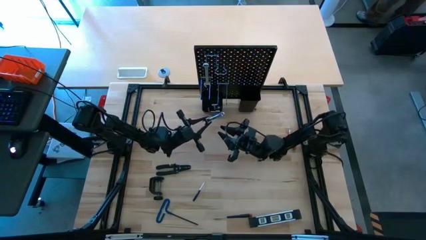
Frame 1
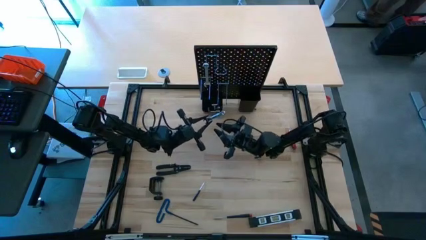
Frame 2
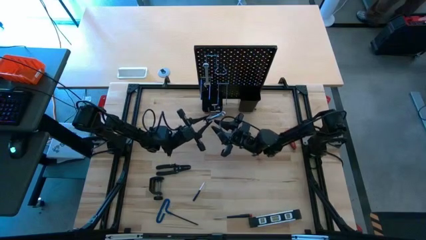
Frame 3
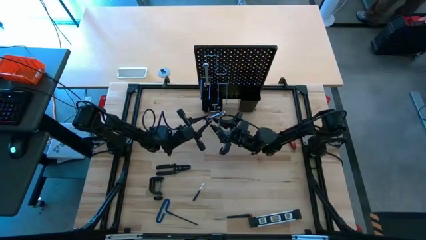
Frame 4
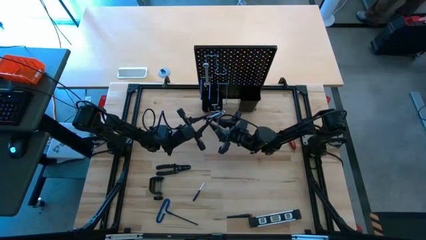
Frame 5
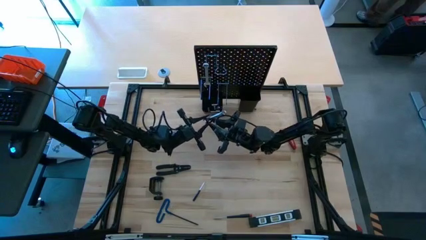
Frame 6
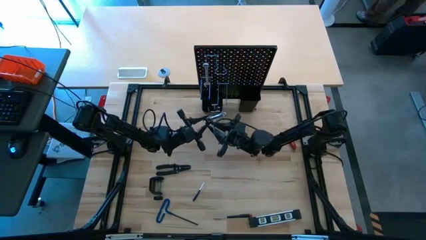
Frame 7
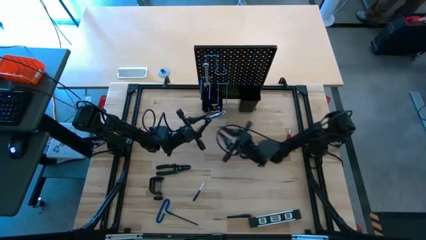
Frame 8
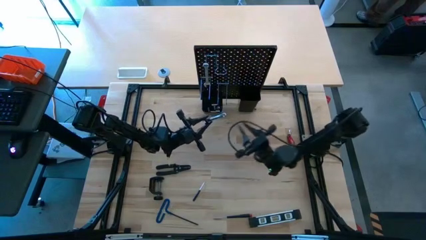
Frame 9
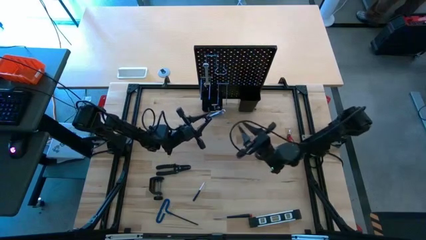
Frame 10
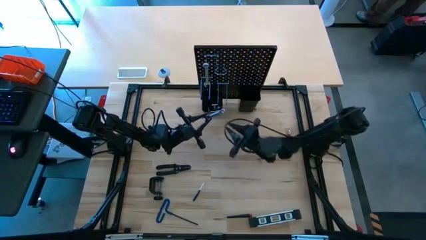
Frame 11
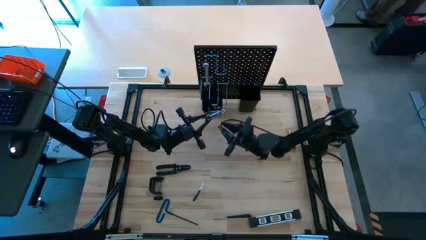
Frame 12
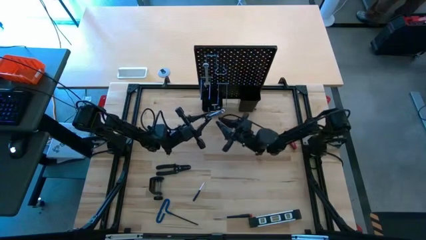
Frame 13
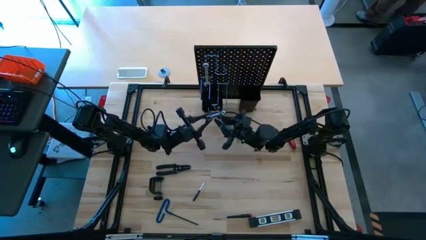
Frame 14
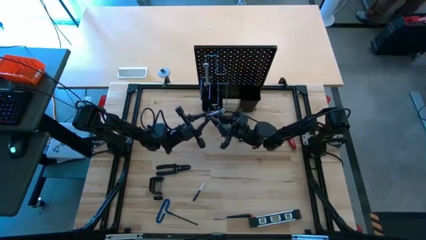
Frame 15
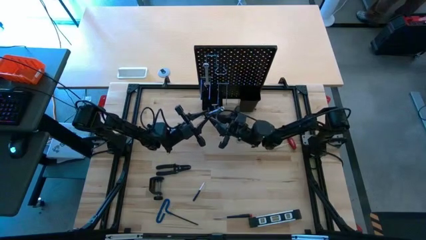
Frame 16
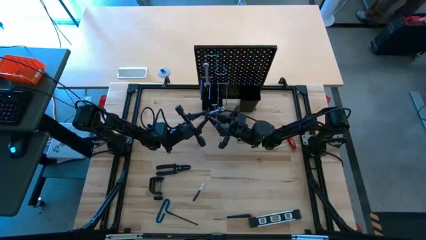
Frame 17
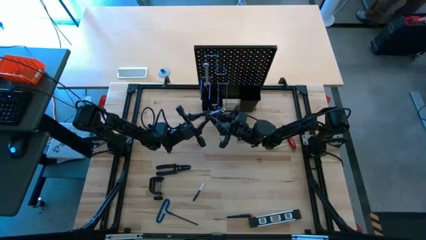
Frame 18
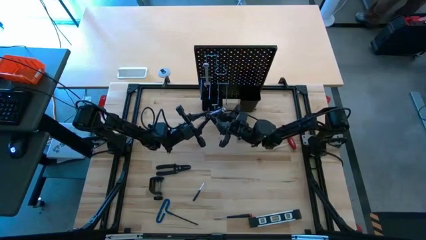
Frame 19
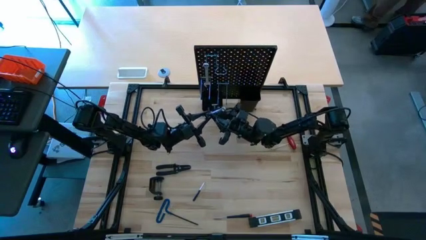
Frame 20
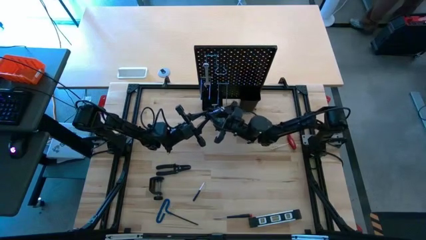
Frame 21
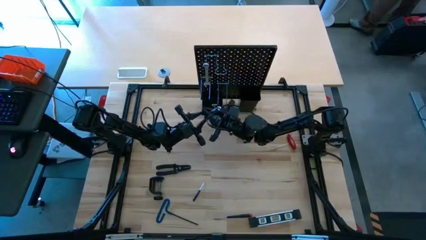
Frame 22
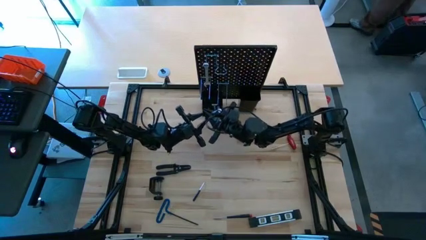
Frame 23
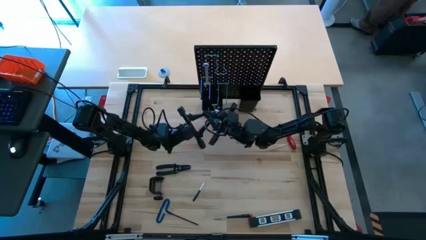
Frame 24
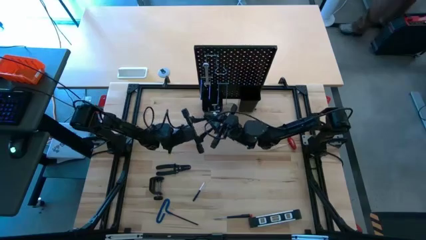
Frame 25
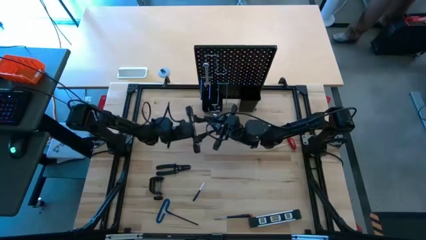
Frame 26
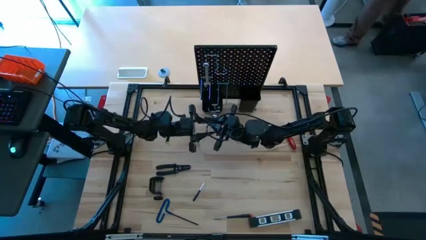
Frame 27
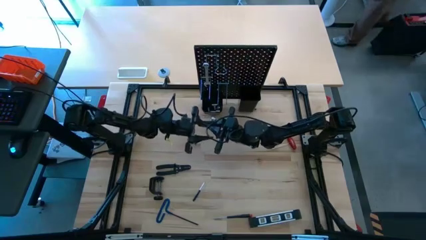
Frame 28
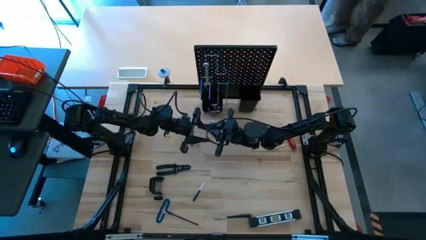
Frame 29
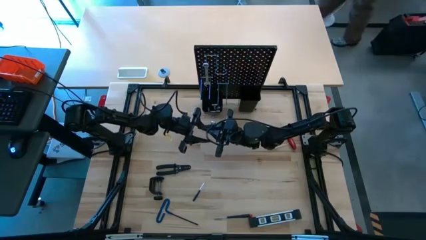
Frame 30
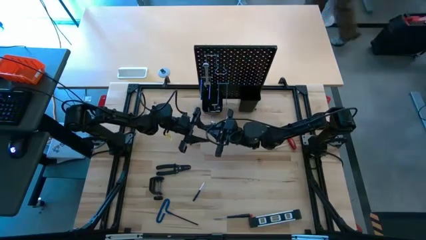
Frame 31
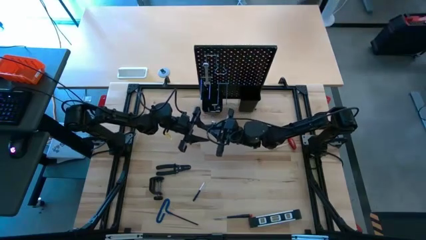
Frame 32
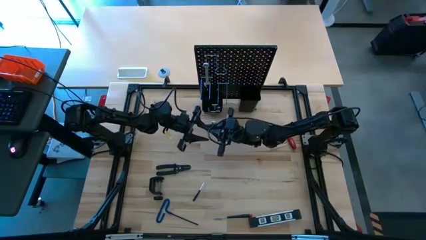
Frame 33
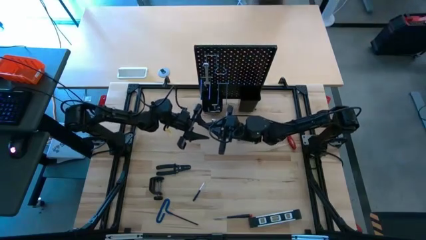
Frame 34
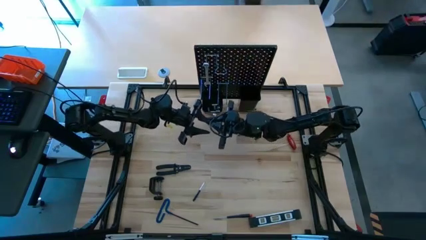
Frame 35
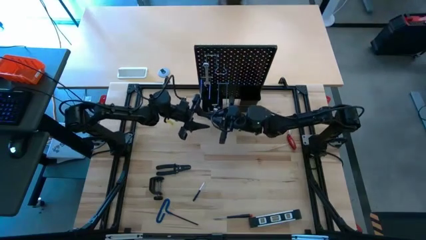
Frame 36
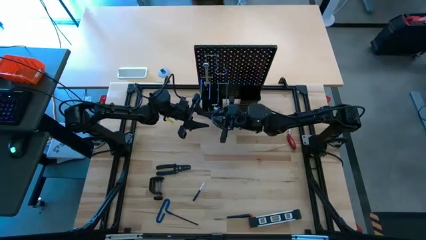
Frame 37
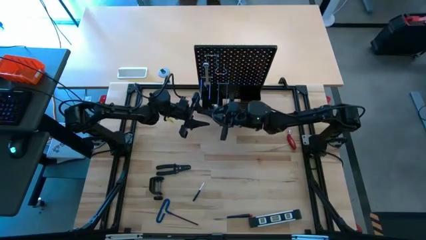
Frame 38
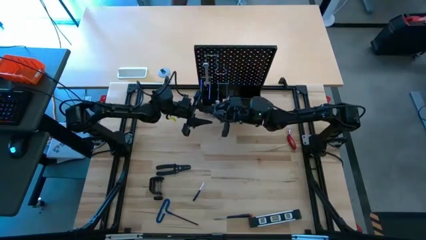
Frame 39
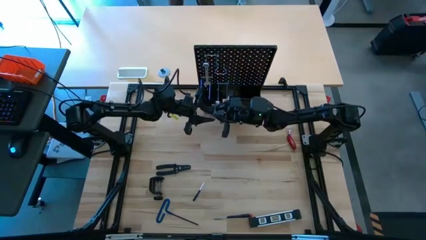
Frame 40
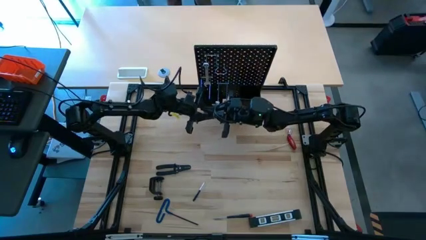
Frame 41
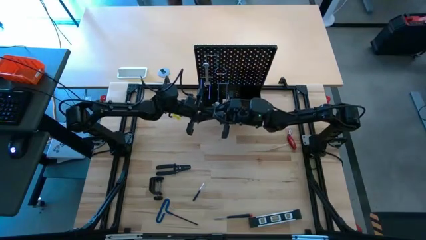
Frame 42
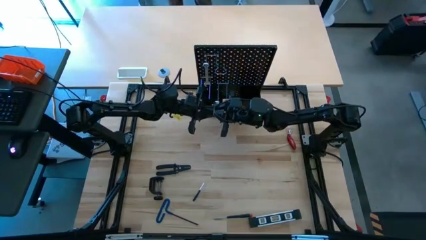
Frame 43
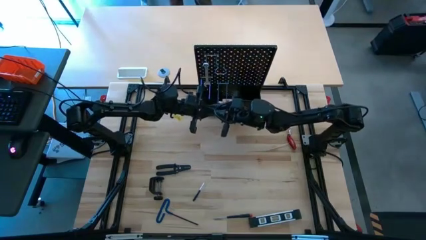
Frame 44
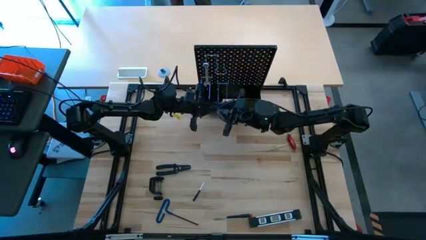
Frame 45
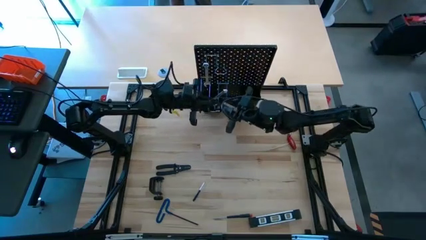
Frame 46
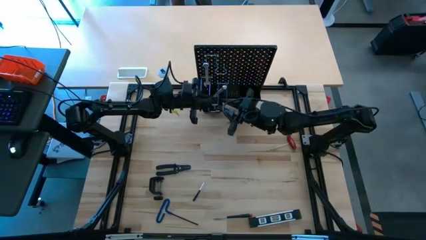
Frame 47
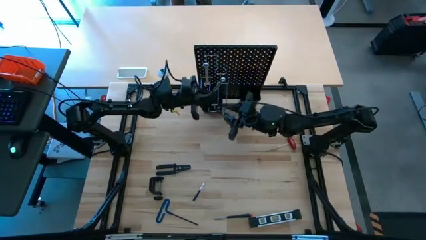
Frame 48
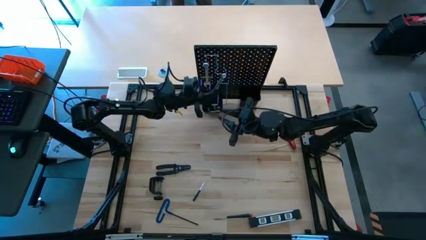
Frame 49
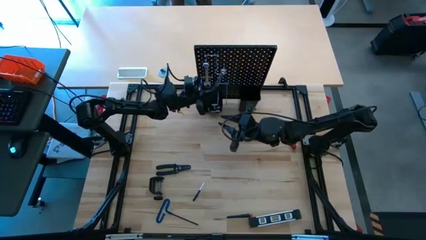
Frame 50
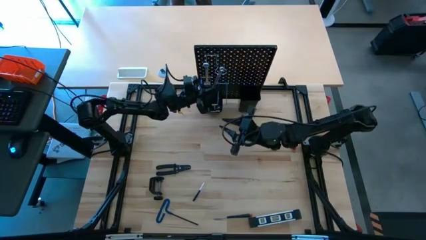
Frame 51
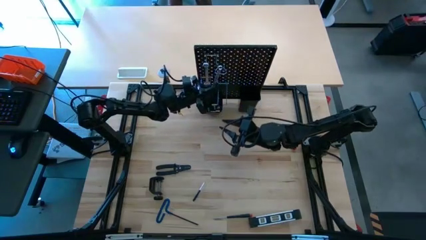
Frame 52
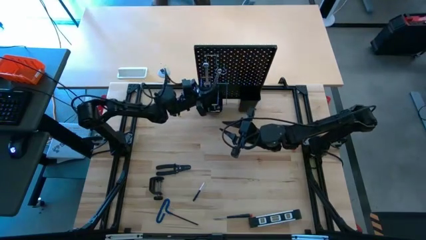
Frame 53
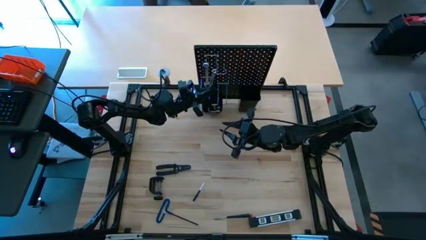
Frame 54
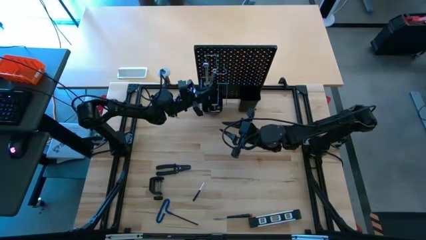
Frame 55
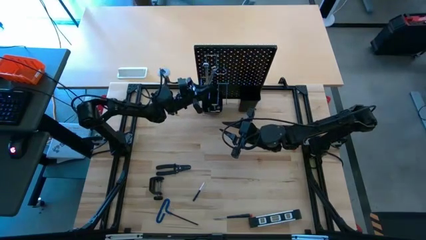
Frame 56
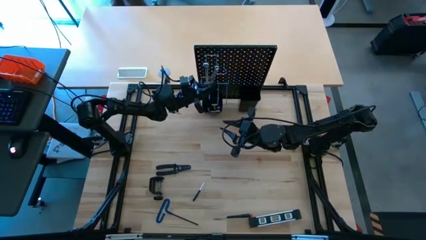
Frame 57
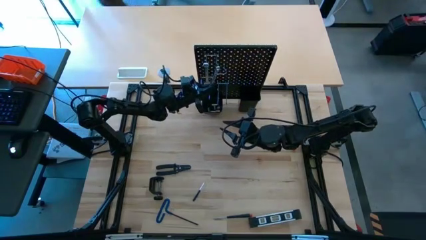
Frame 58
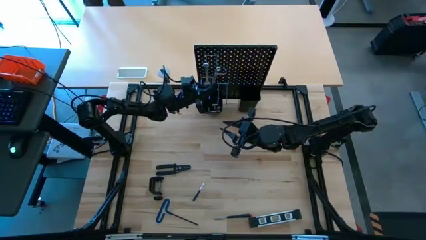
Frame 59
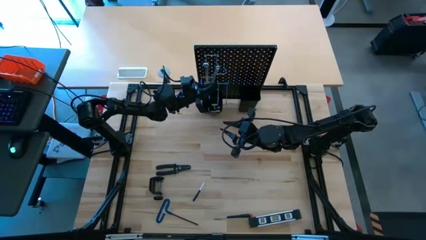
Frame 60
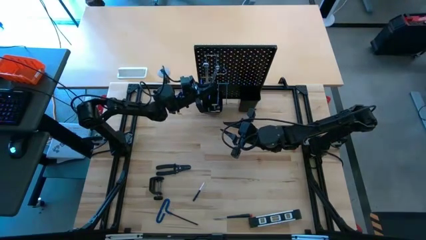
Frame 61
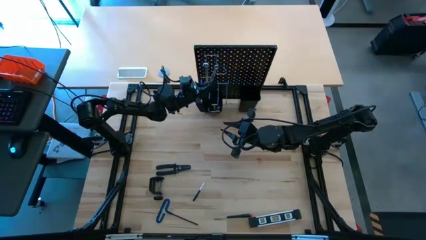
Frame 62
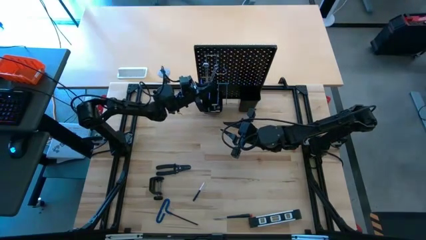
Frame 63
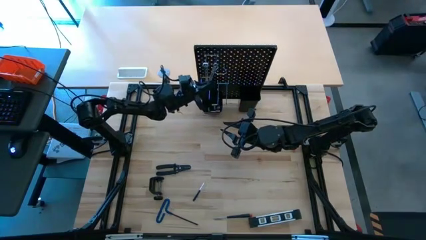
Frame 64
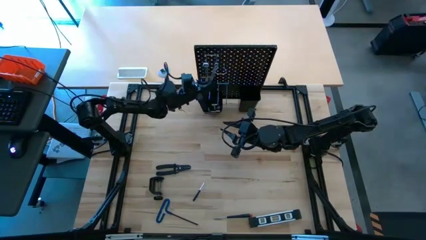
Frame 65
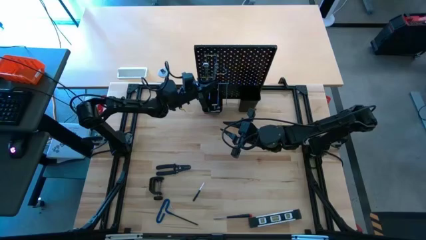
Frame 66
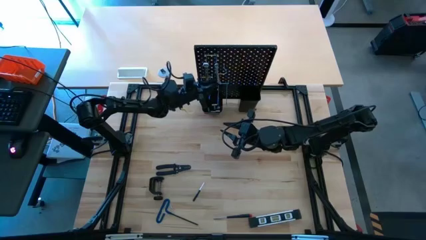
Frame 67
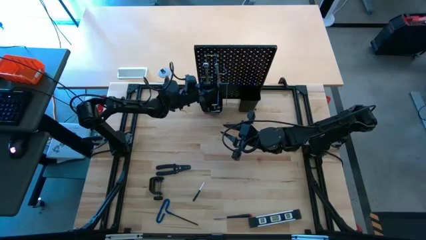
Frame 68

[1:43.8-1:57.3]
Task: Hang tools onto peg board
Hang the wrench onto the pegboard

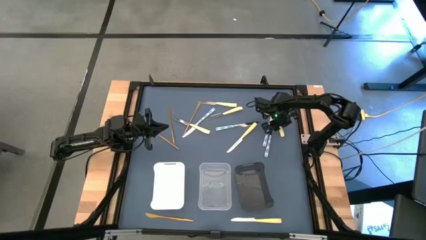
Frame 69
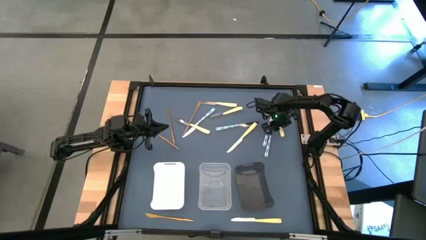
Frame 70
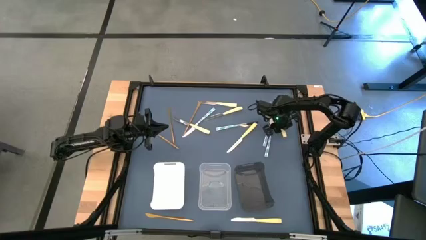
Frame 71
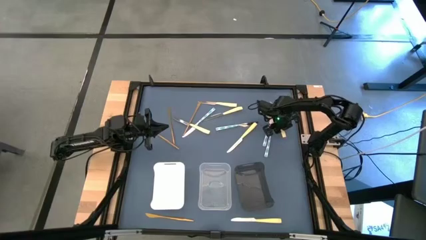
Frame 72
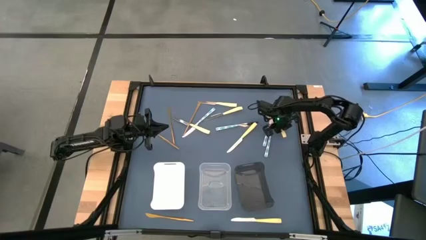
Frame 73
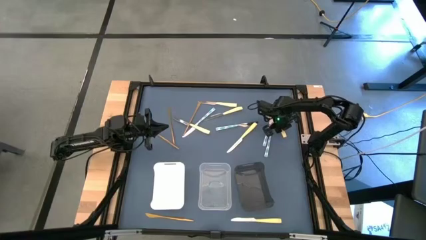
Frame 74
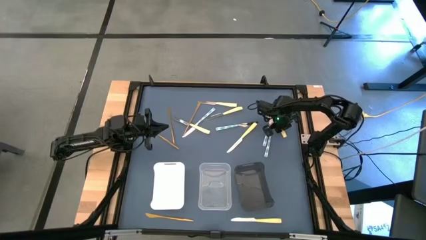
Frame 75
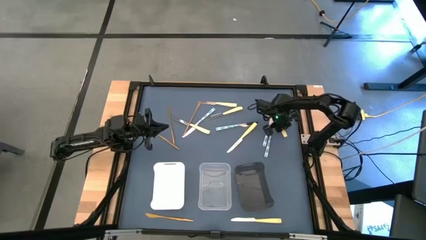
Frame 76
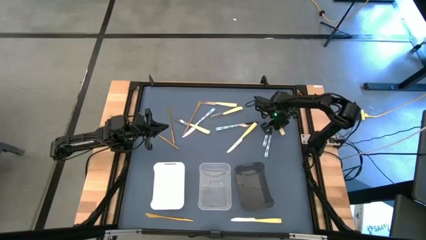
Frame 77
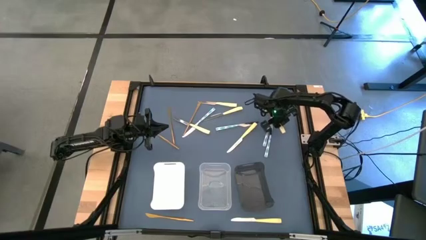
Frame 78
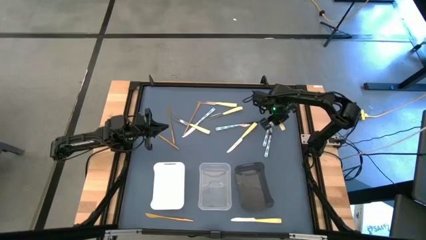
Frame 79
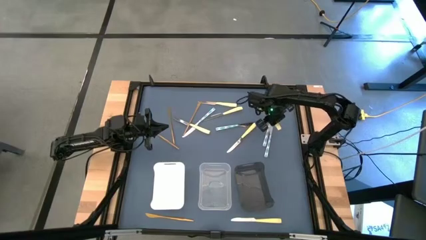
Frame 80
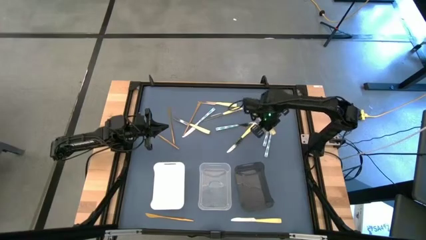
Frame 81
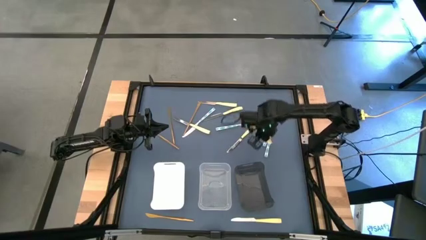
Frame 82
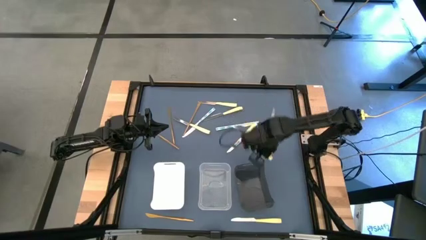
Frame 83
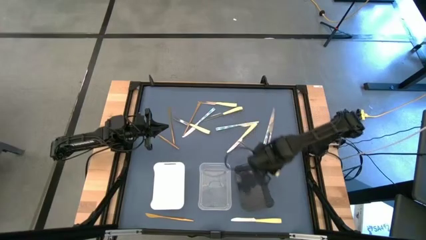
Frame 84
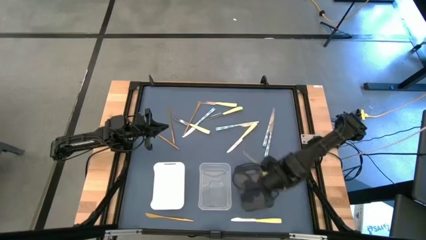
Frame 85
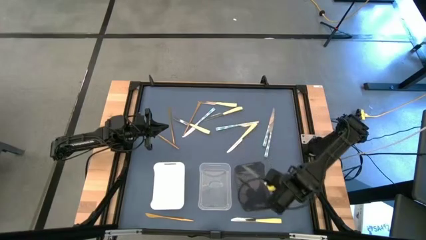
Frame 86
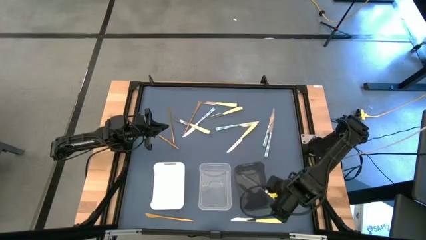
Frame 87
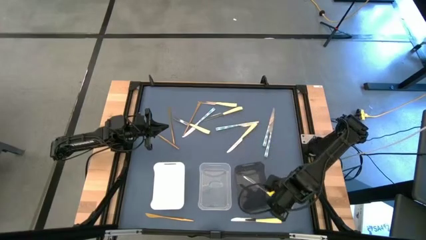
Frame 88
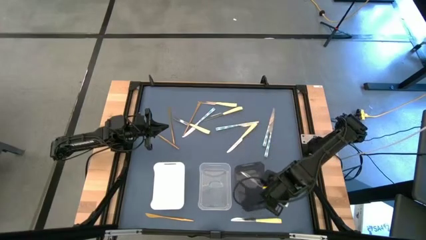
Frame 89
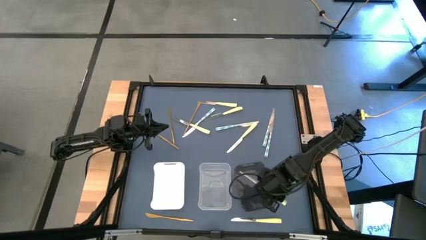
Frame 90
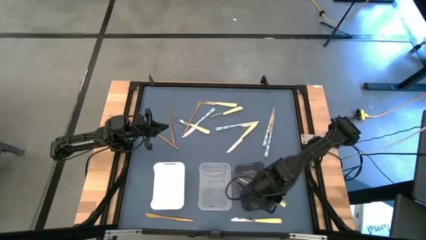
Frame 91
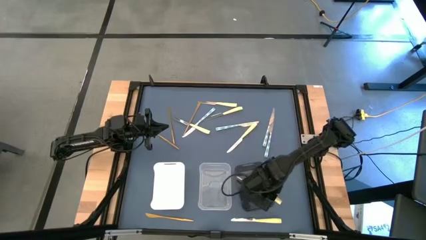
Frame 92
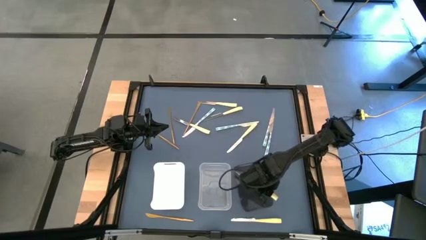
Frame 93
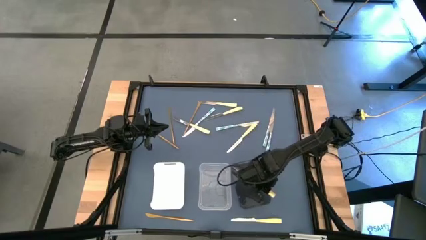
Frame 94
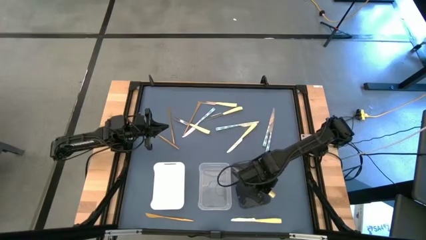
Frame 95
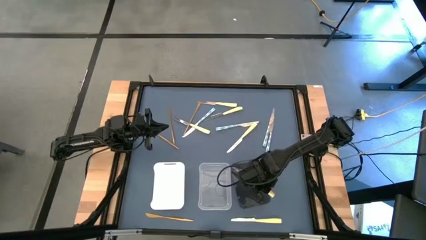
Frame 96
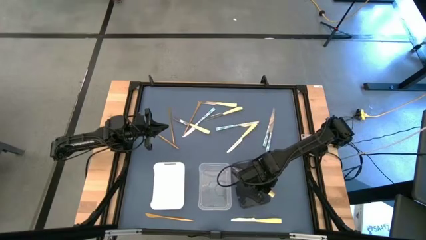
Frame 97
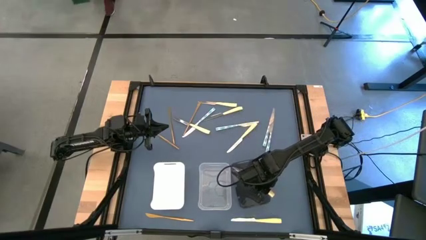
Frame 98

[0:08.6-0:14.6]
Task: Sort silverware by color (type)
Put the yellow table knife into the black transparent bin
